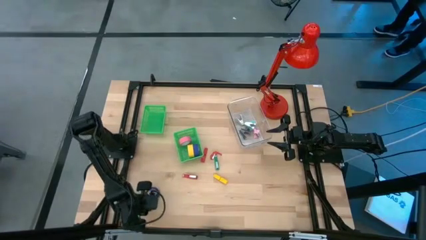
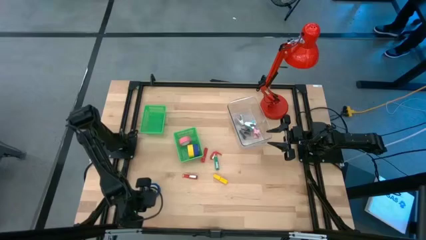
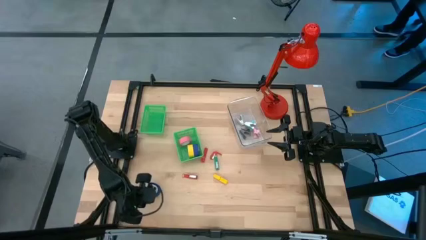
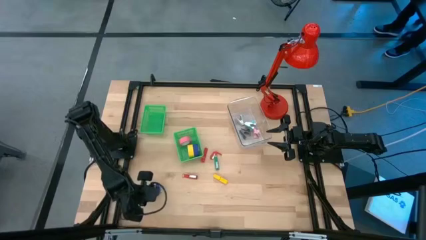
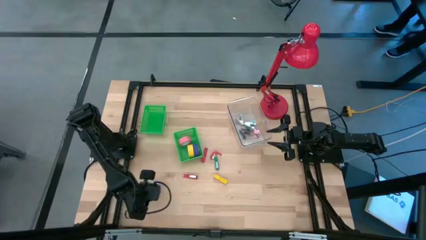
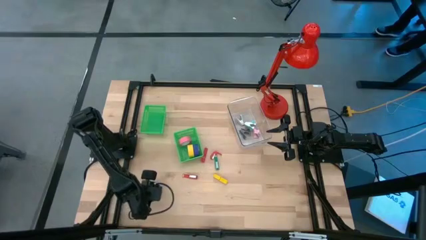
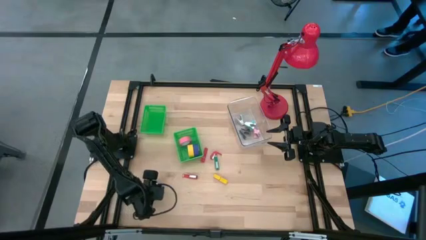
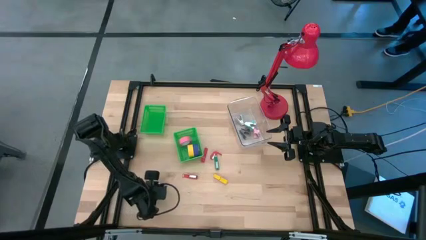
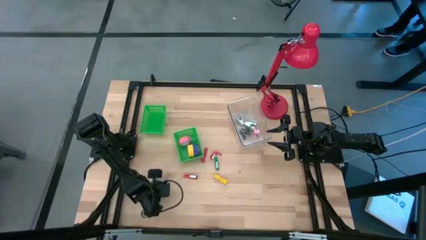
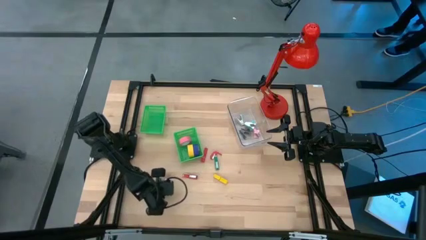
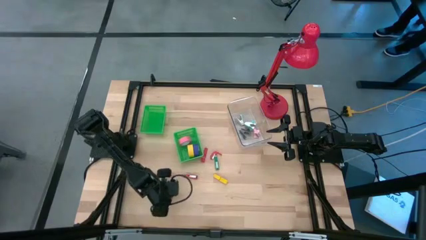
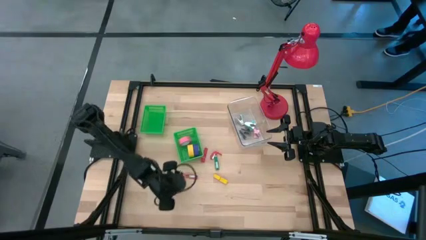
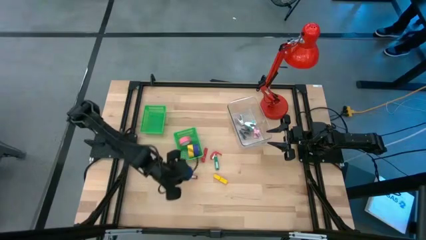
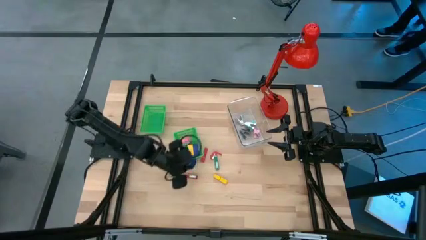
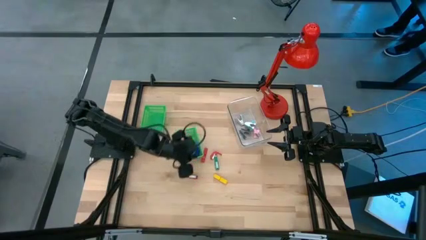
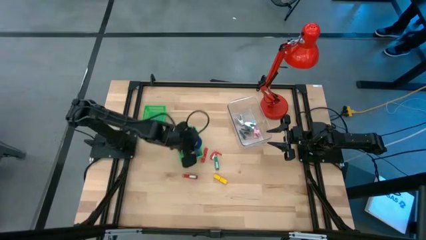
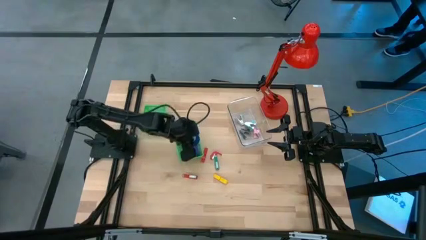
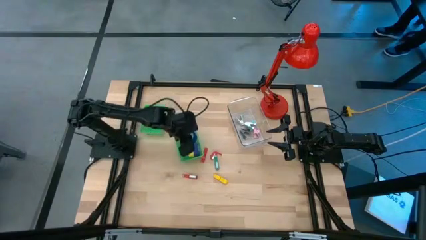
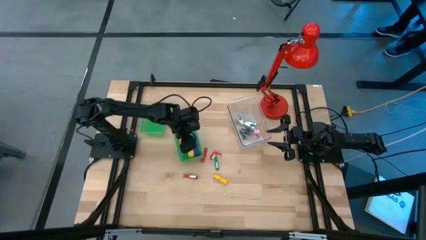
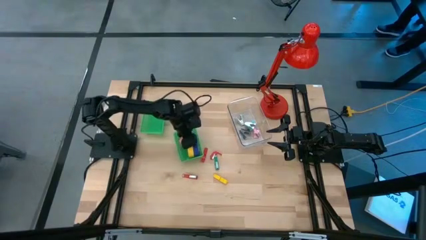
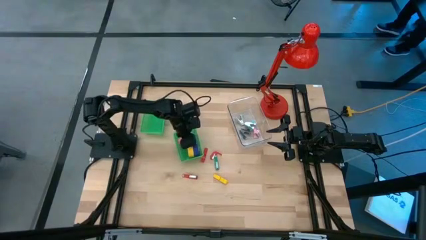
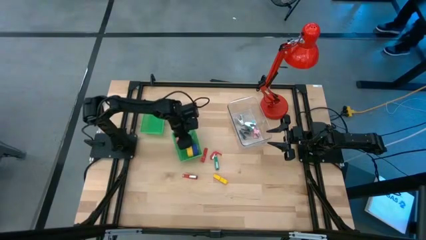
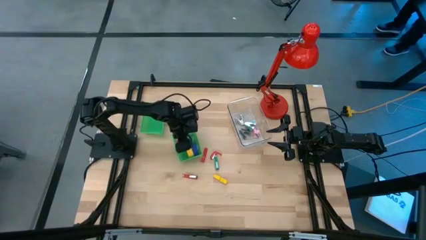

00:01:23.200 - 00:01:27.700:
Task: Pick and place Stapler, Stapler remover, tape
Put the blue tape into the right green bin

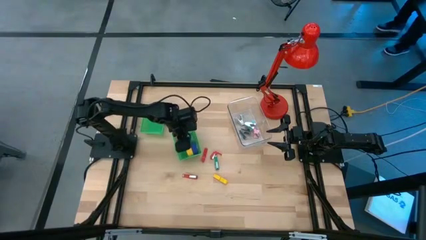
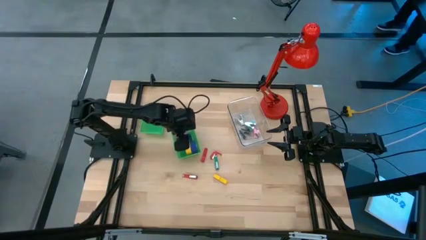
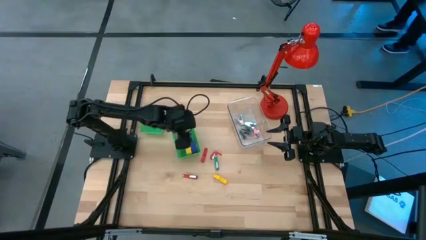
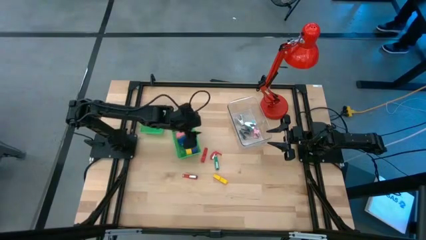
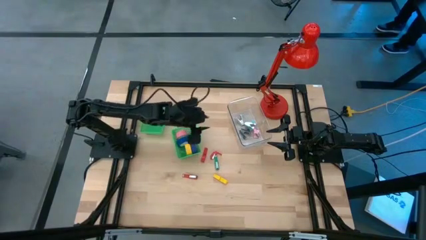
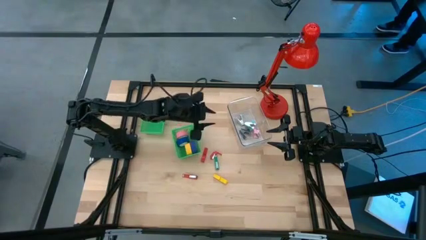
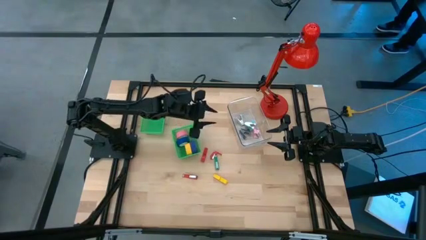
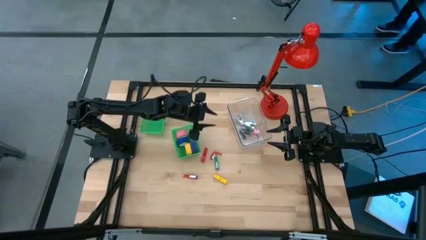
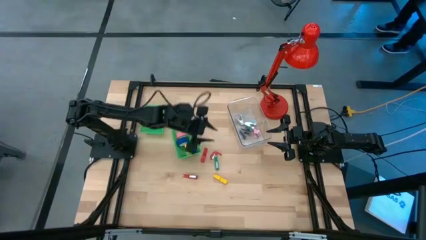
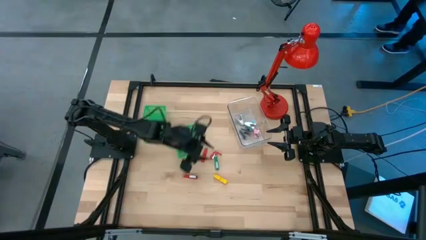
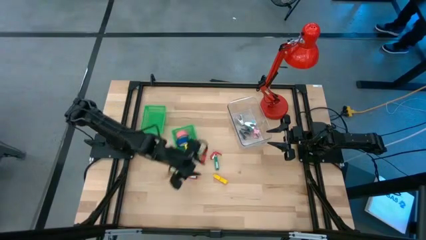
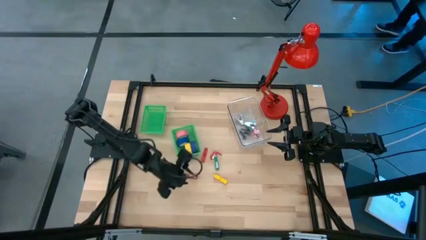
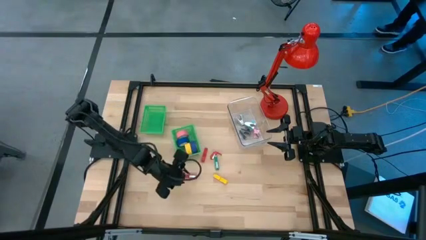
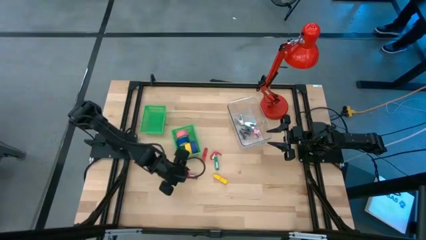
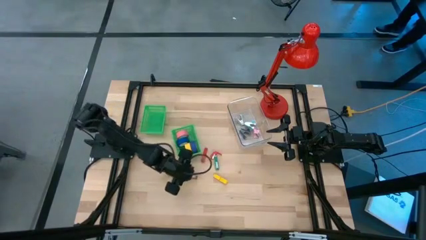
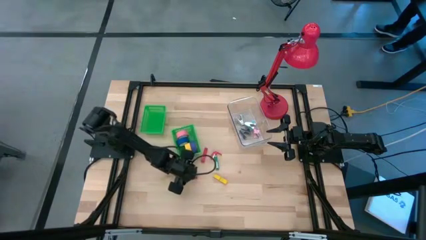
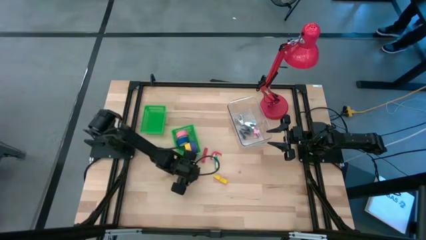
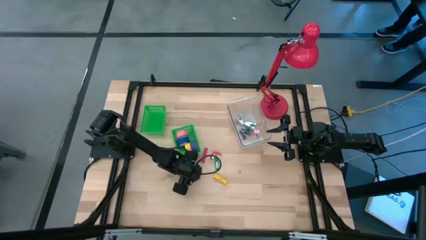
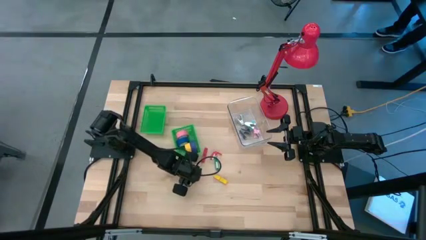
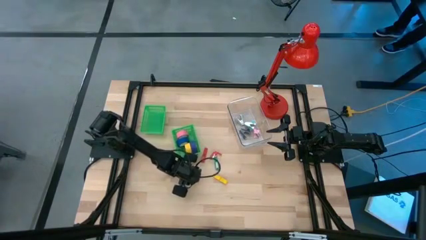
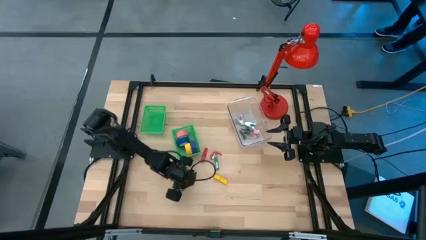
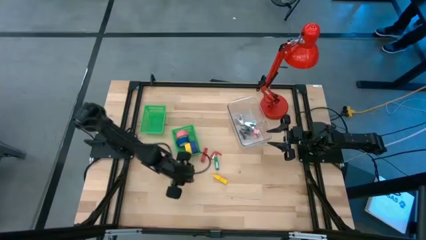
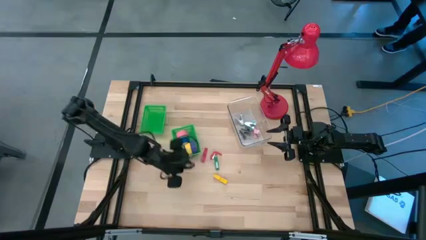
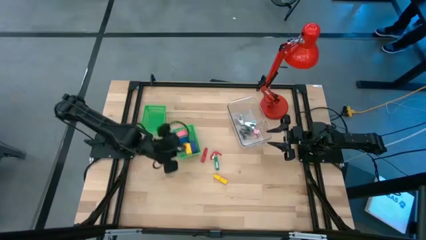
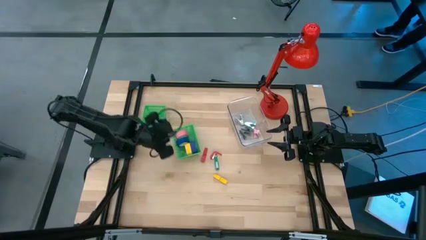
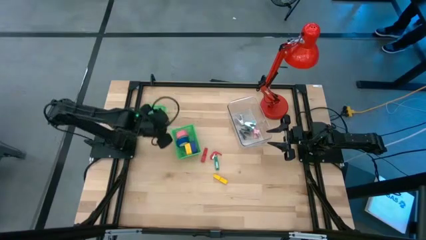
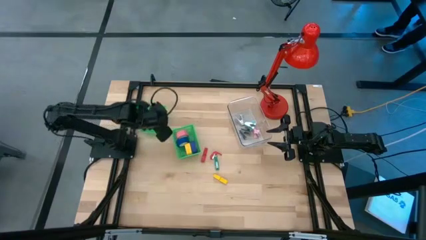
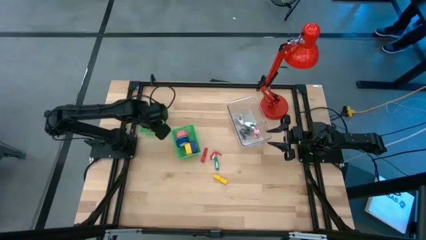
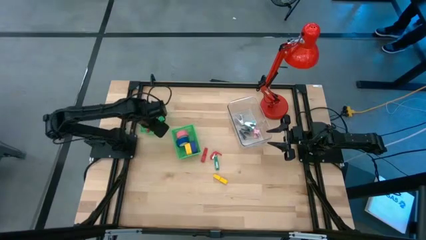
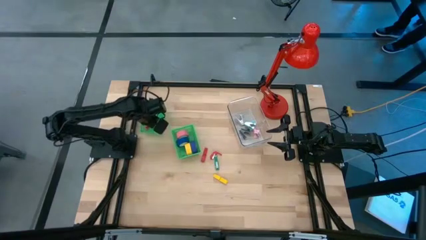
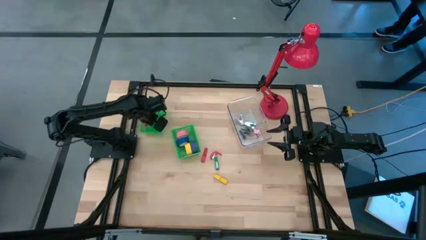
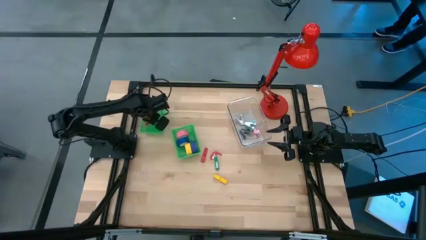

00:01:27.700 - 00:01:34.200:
Put the red stapler into the left green bin

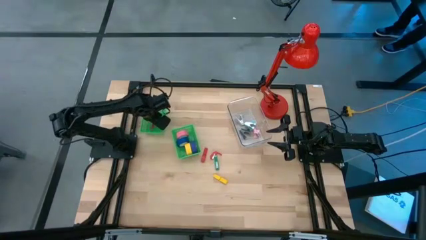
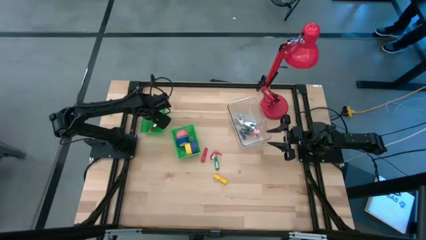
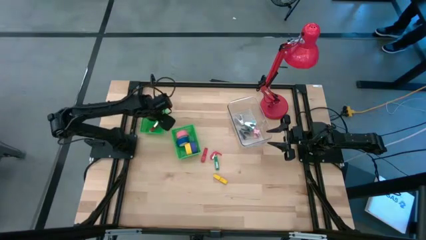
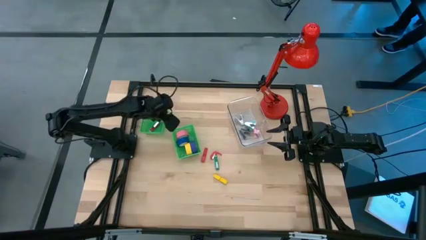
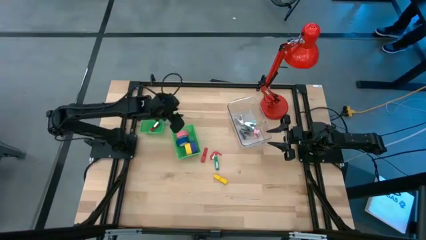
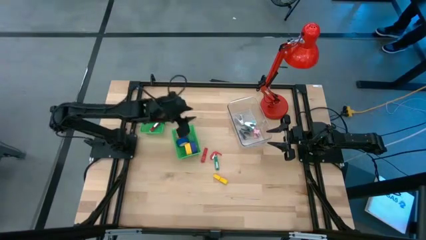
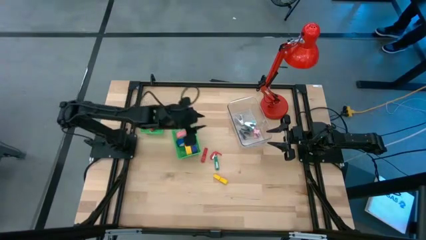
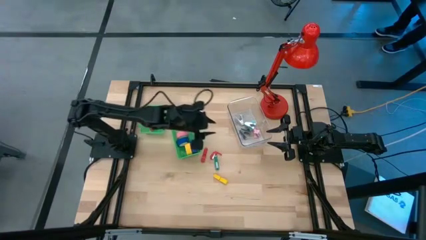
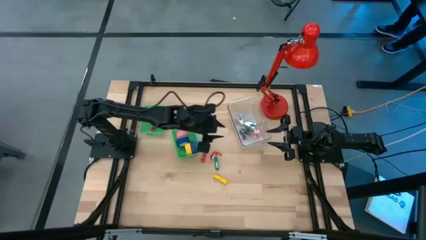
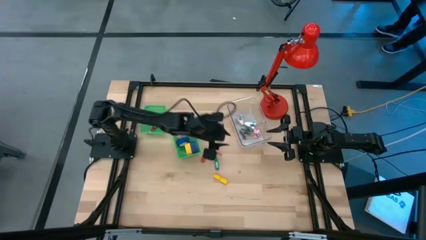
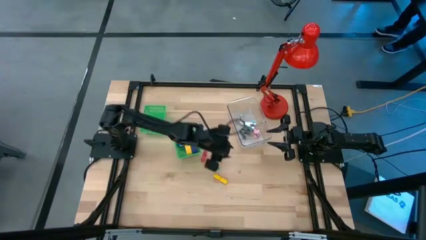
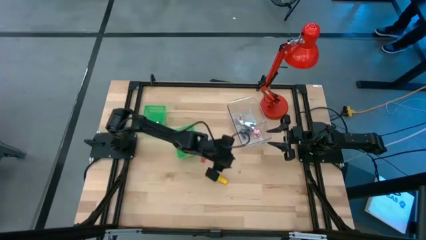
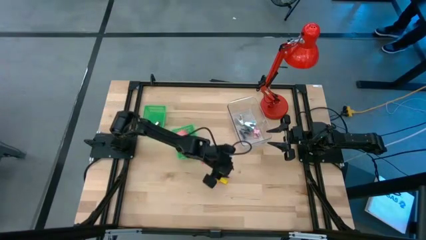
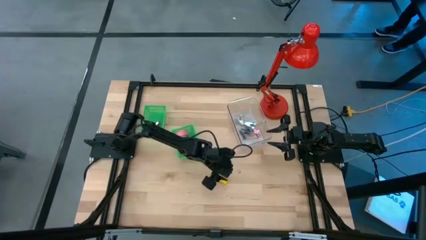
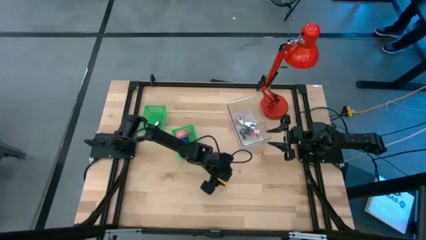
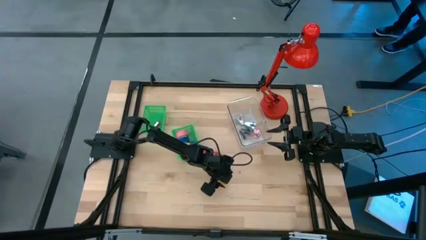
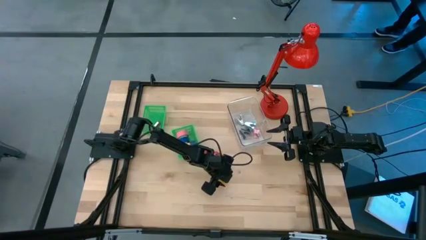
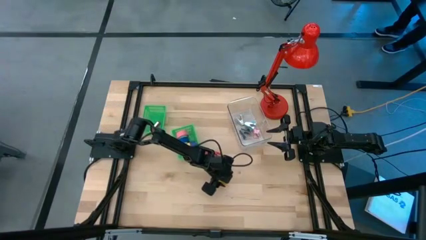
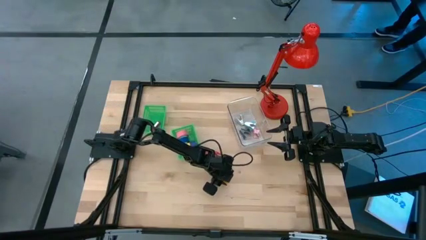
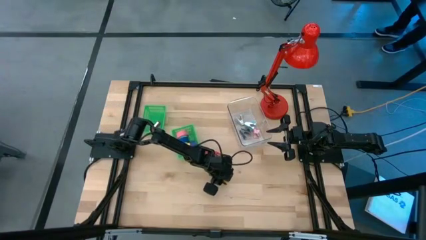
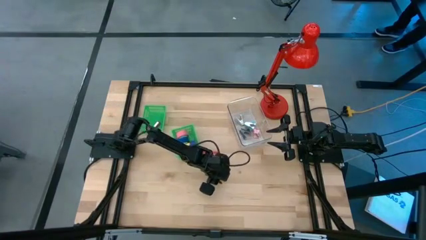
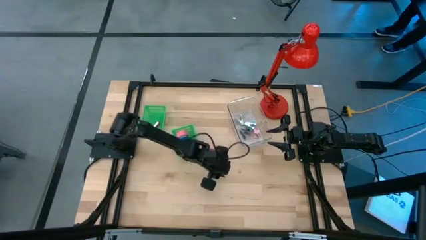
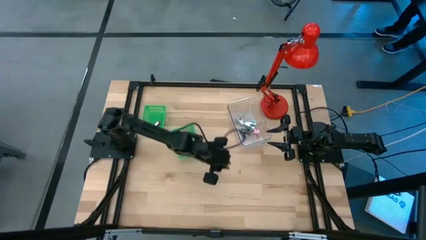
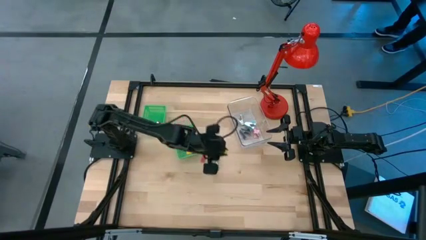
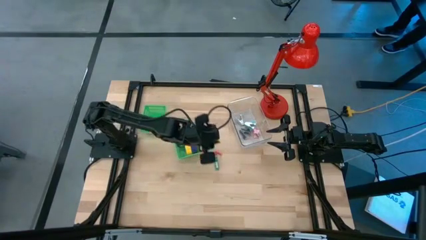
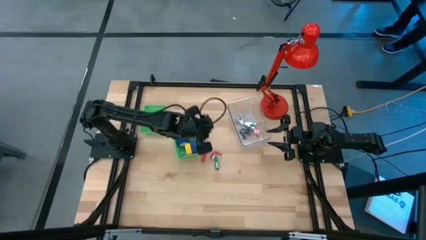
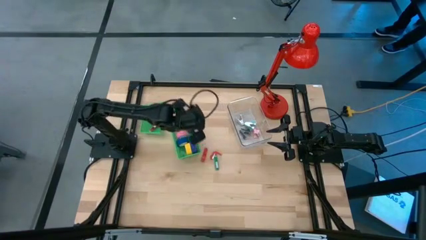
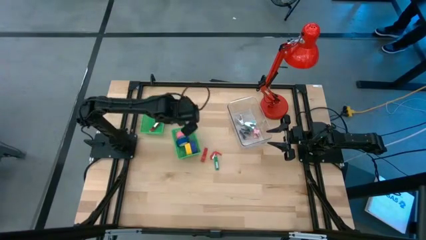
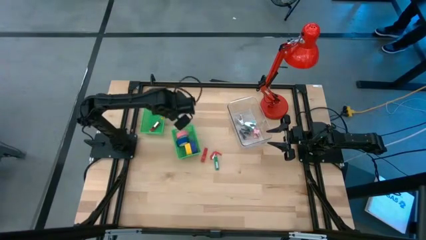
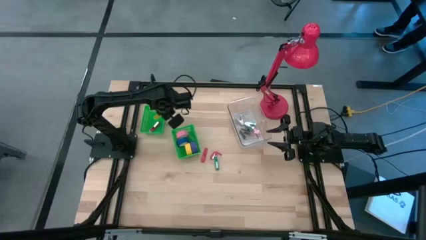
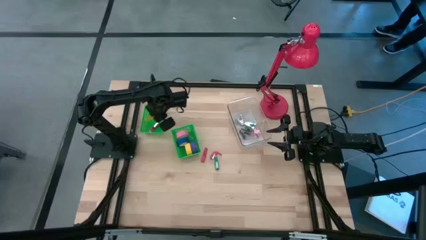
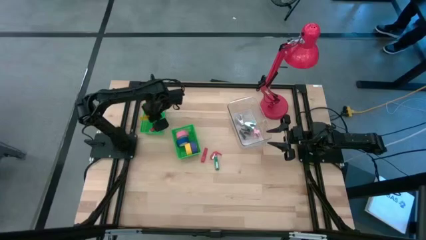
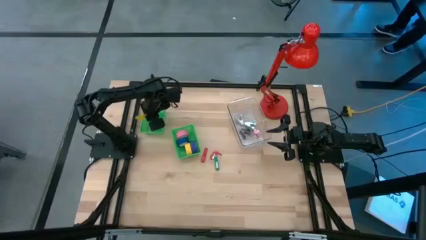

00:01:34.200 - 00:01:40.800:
Put the yellow stapler into the left green bin
